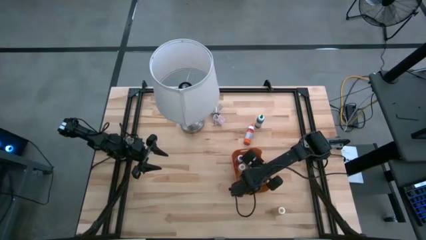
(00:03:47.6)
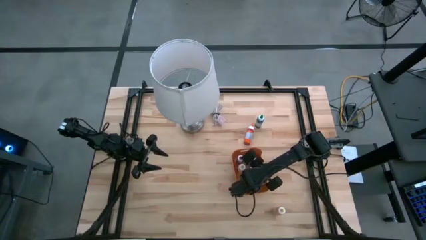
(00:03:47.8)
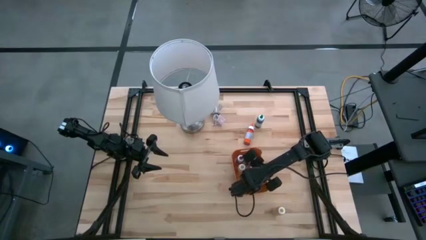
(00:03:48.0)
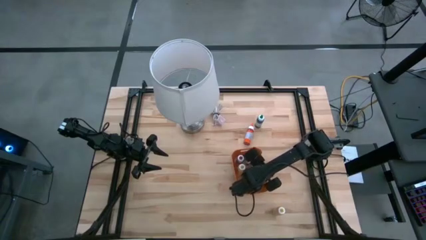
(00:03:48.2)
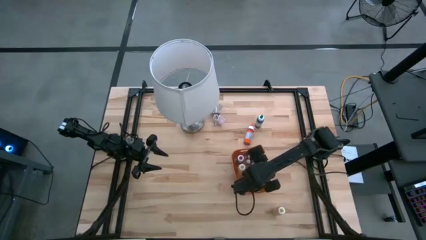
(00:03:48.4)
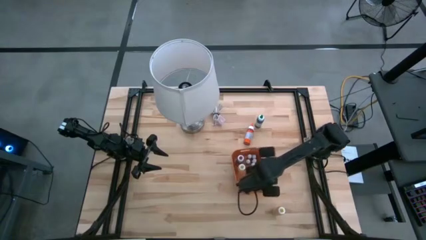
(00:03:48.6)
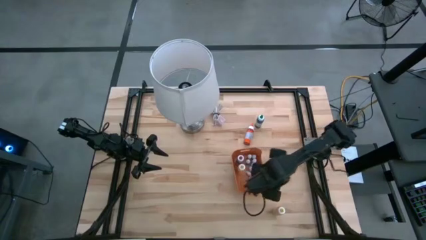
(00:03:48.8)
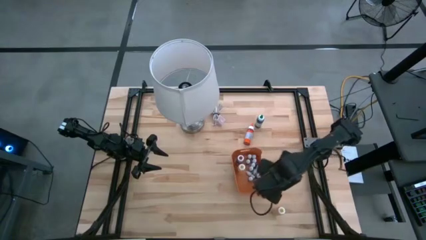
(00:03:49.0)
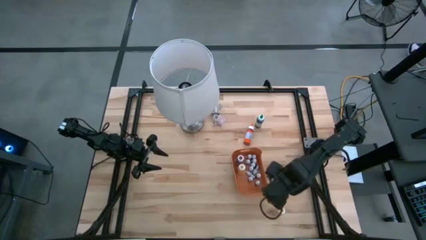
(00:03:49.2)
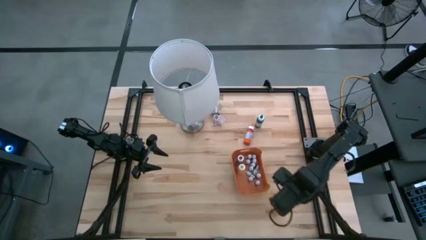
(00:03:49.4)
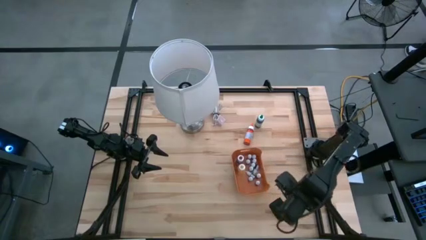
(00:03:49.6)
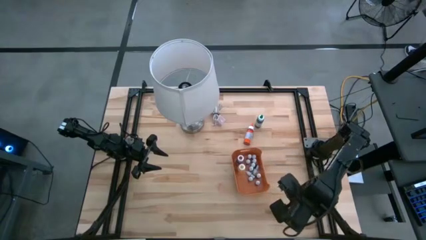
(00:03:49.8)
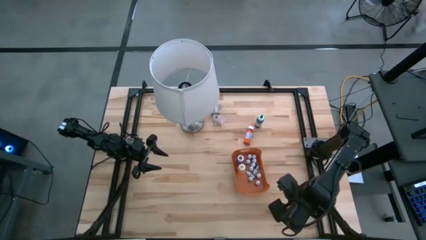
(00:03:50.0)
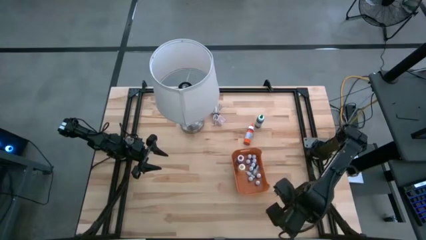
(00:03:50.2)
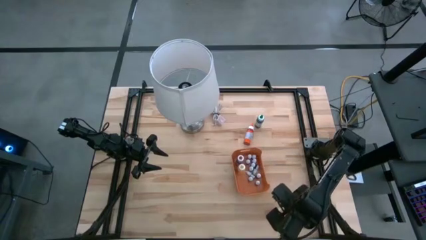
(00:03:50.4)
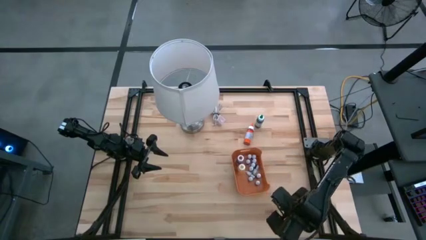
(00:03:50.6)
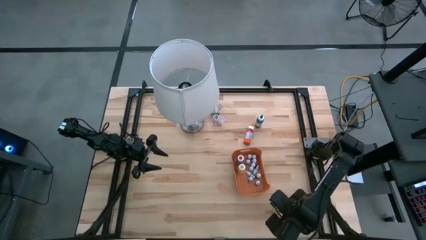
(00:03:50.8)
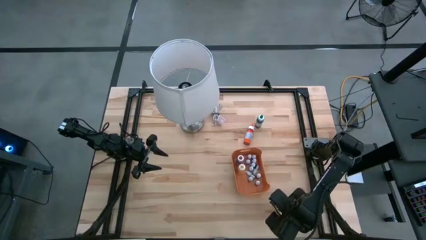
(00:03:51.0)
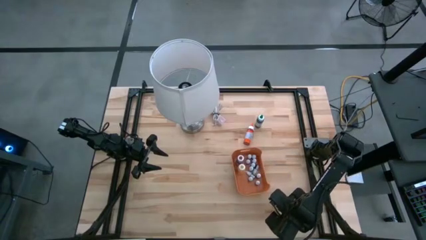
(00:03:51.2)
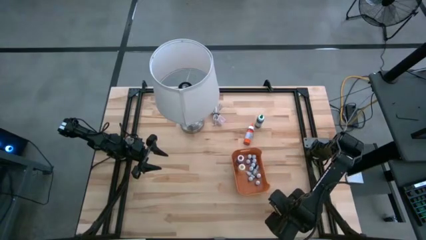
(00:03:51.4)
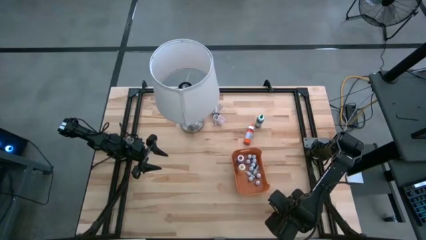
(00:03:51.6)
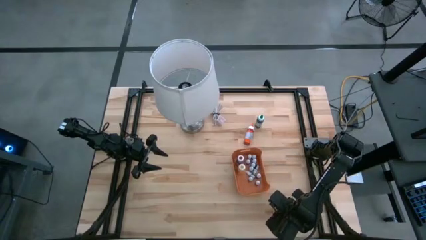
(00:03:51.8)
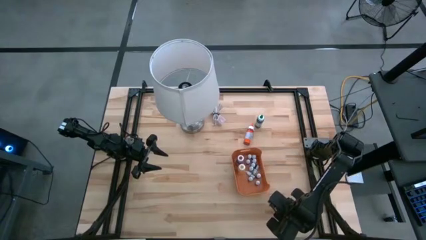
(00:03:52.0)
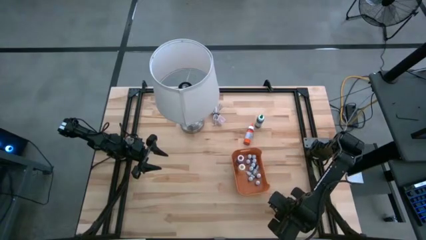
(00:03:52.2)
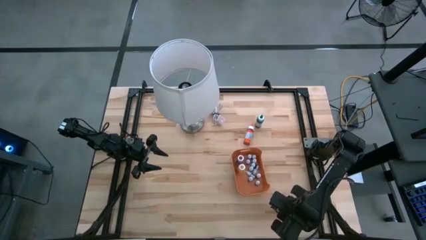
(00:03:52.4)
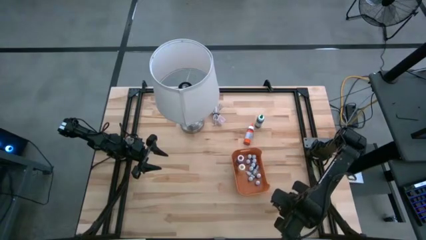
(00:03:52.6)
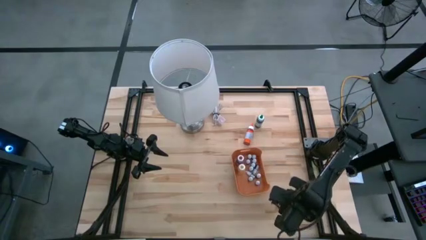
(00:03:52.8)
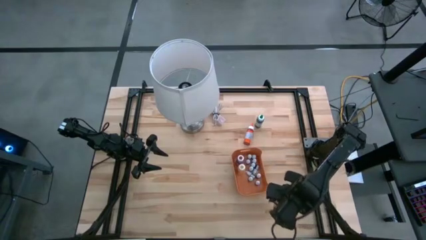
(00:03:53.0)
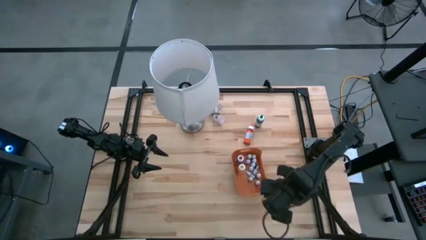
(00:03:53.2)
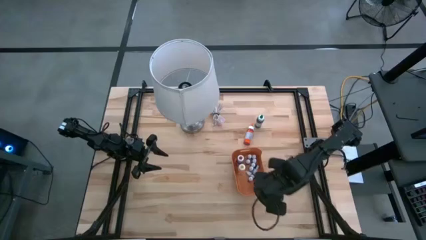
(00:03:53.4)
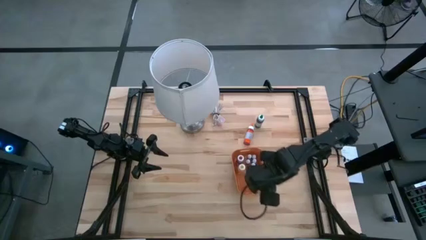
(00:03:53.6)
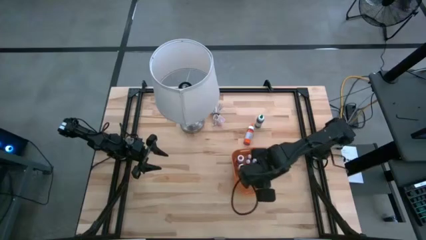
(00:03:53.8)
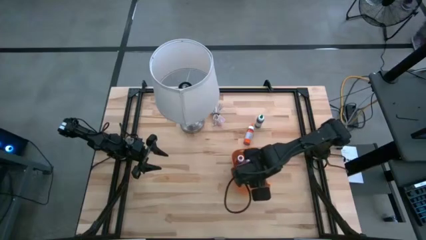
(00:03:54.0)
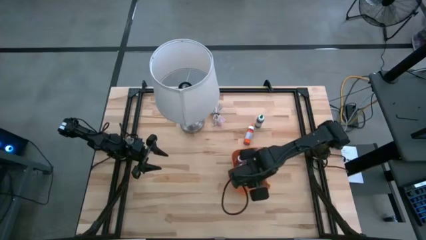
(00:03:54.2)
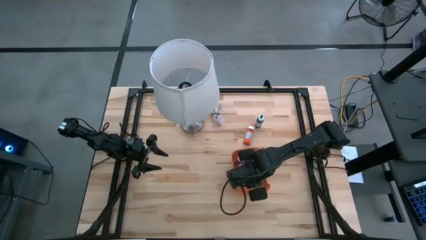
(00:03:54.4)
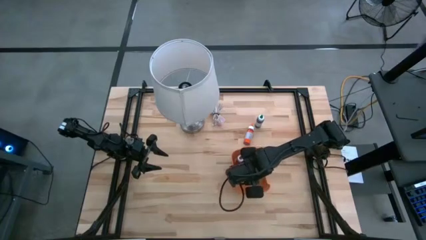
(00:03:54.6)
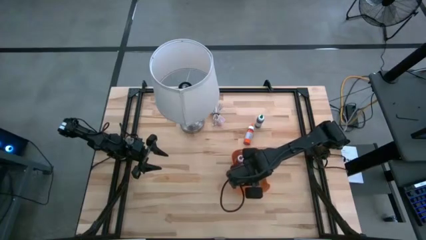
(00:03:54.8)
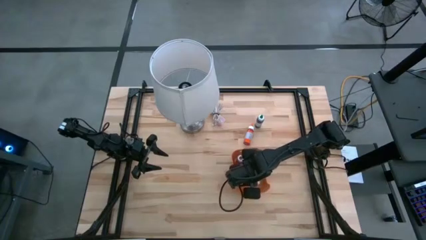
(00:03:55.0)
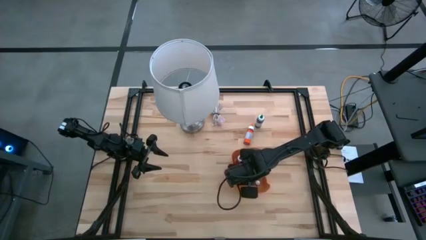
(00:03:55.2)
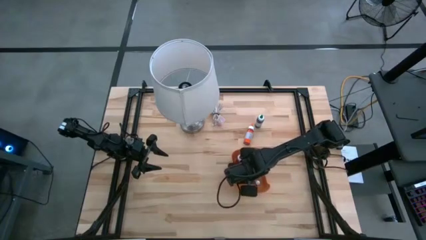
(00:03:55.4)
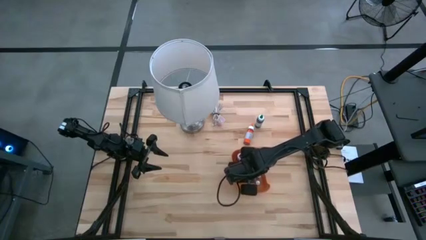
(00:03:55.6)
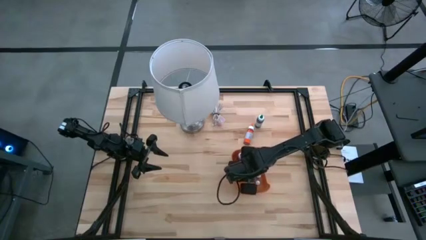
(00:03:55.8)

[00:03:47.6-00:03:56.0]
Task: Pick & Place food coloring
Put the big food coloring bottle into the orange bin

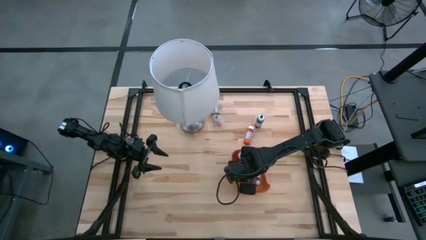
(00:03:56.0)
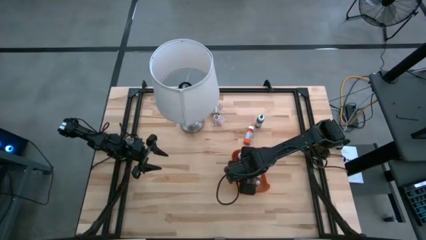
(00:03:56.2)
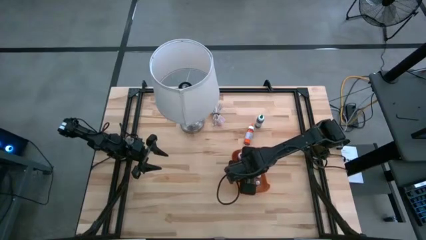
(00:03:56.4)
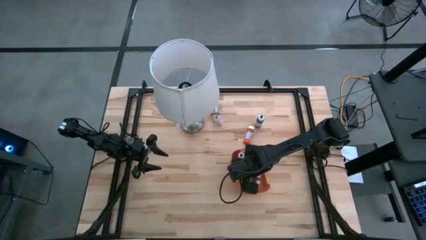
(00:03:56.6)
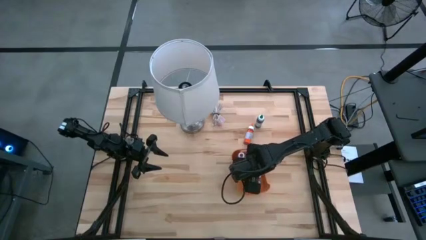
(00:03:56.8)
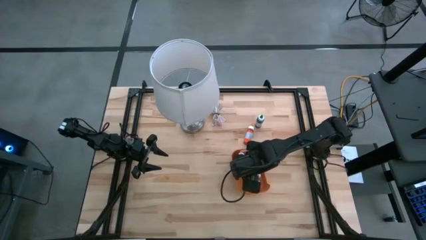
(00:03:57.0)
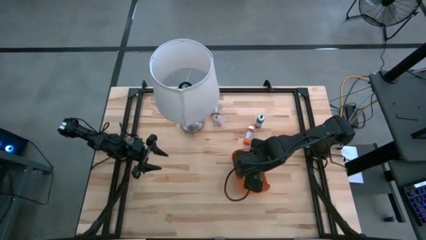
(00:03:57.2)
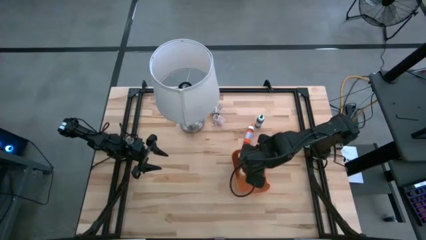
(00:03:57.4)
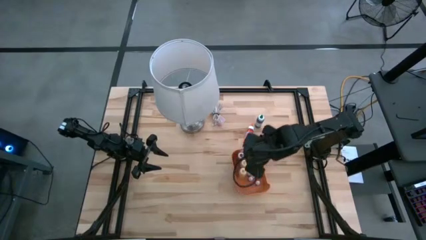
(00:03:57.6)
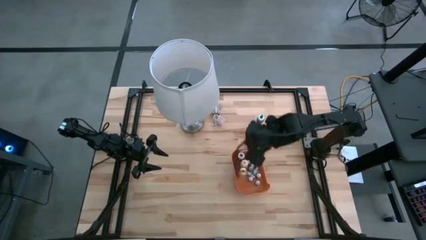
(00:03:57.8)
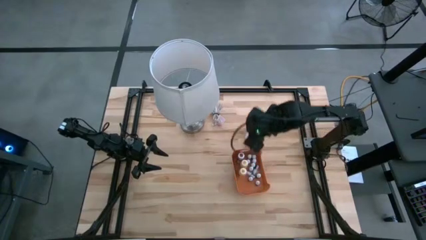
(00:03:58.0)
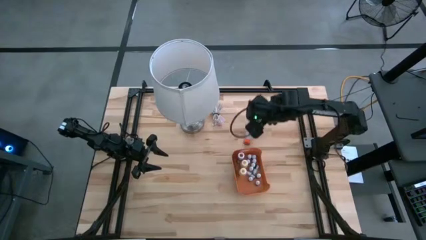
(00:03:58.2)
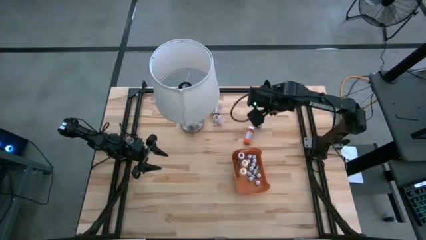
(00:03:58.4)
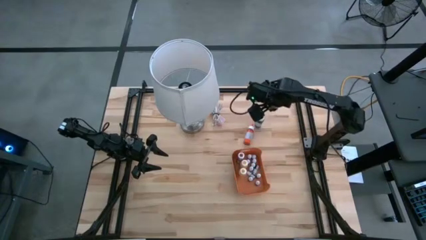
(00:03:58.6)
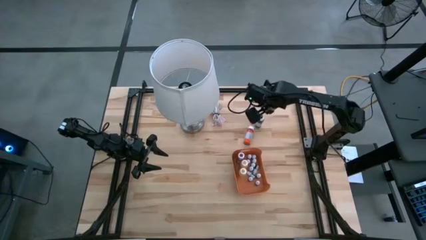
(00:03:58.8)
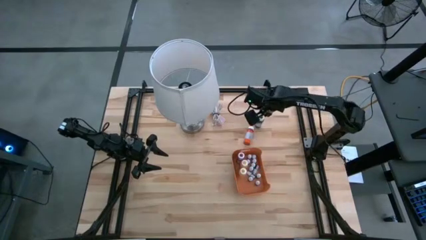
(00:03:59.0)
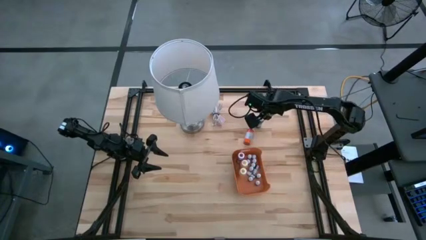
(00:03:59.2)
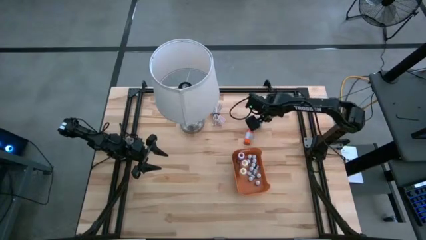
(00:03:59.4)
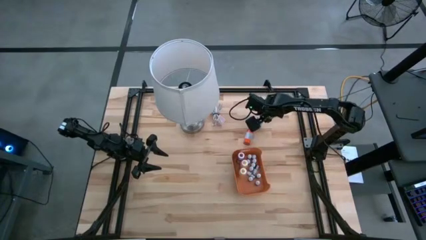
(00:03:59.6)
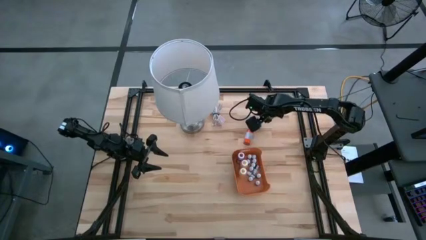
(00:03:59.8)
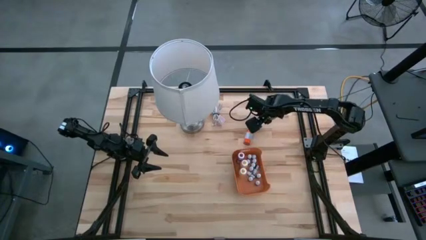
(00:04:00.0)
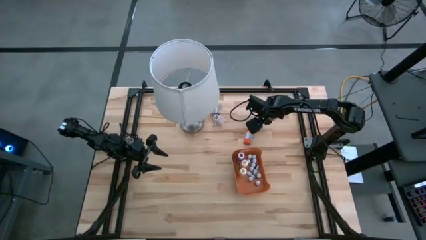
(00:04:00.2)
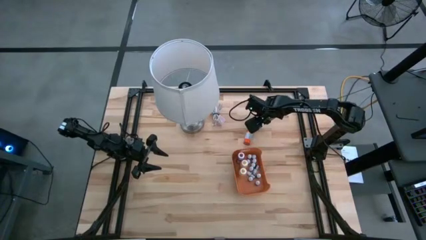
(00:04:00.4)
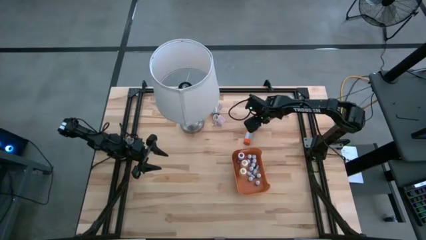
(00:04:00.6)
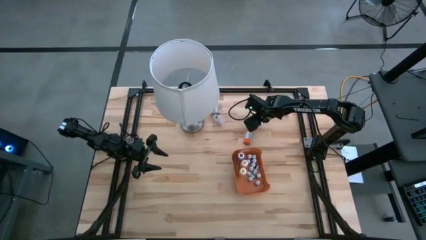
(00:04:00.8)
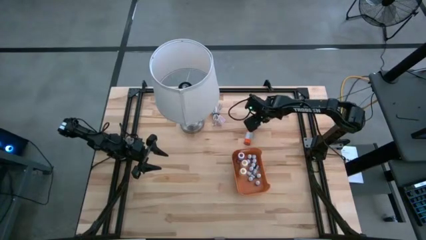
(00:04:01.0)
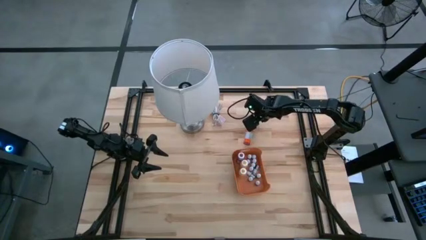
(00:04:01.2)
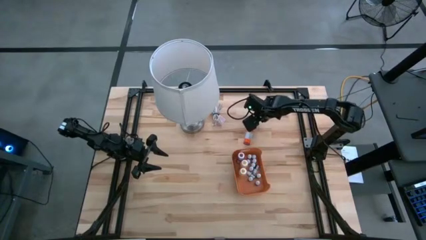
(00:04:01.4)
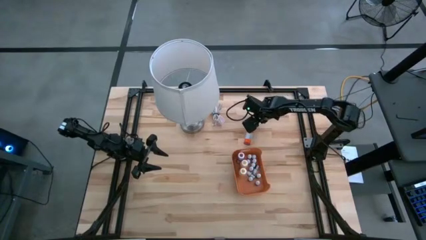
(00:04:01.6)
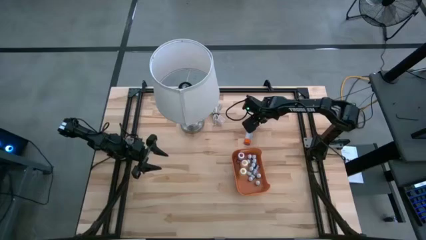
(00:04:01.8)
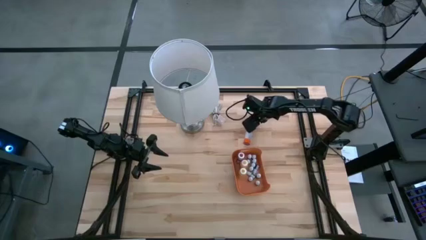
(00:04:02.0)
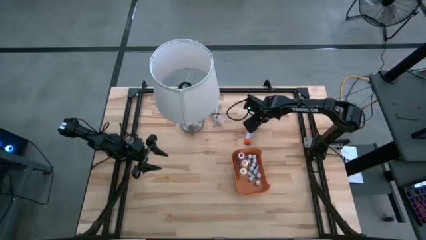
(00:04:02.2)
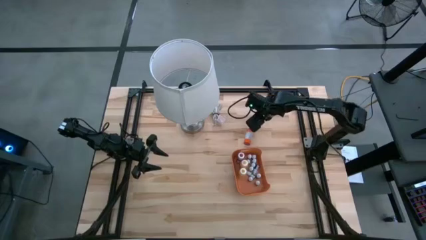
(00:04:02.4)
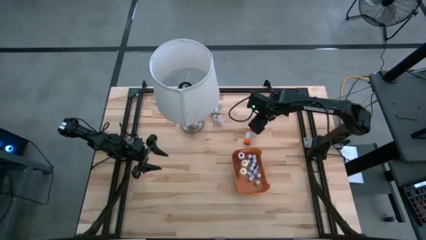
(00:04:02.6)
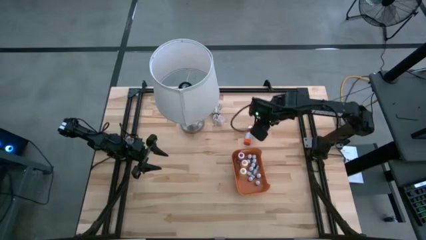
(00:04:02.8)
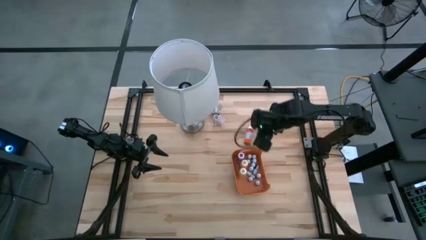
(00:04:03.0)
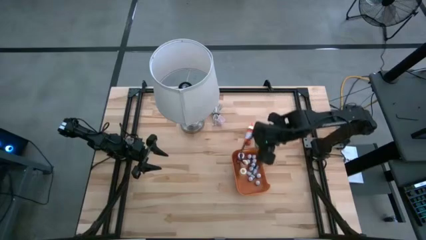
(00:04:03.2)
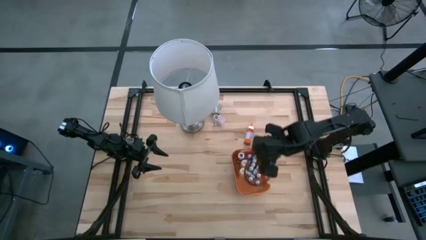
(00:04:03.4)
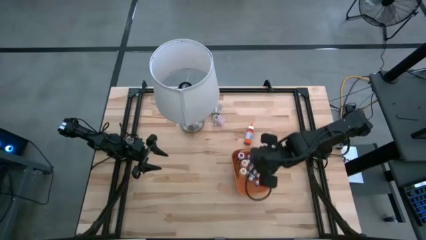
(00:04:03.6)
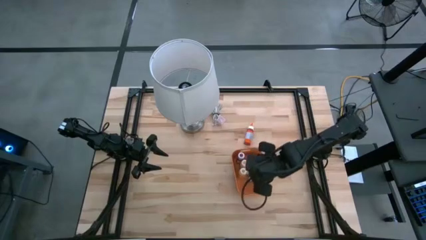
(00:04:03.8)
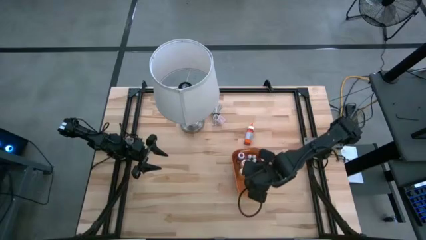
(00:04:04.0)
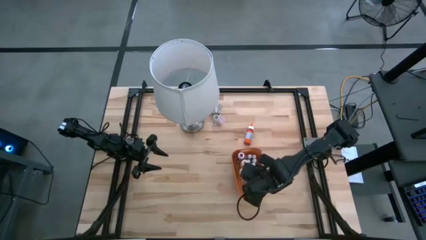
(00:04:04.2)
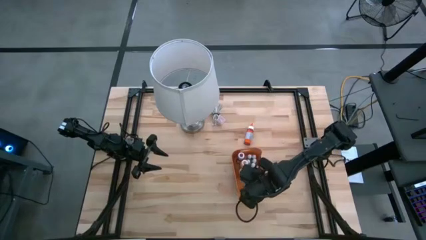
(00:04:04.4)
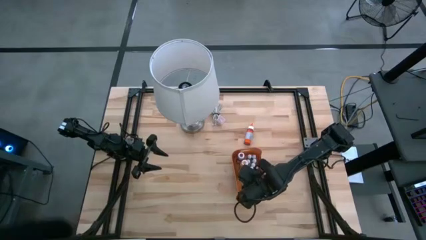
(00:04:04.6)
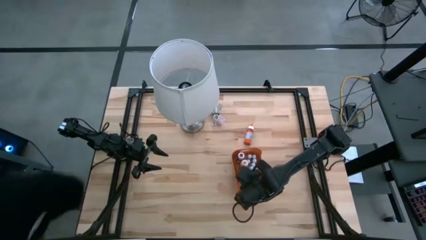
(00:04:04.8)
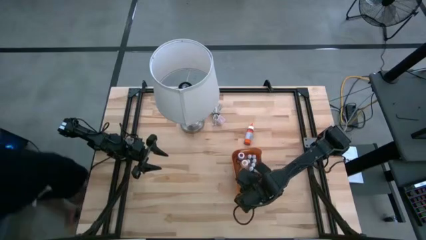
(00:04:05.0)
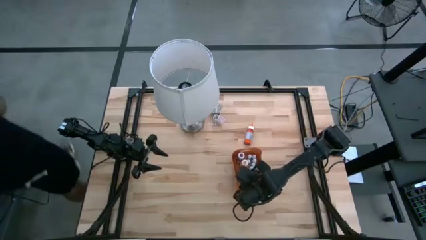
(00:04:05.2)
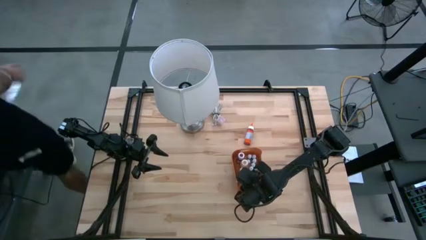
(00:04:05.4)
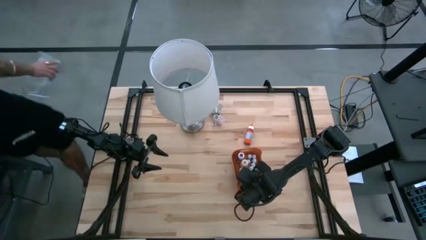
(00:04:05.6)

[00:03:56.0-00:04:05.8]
Put the big food coloring bottle into the orange bin
